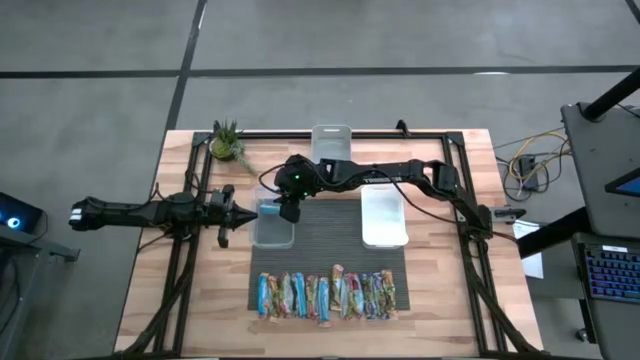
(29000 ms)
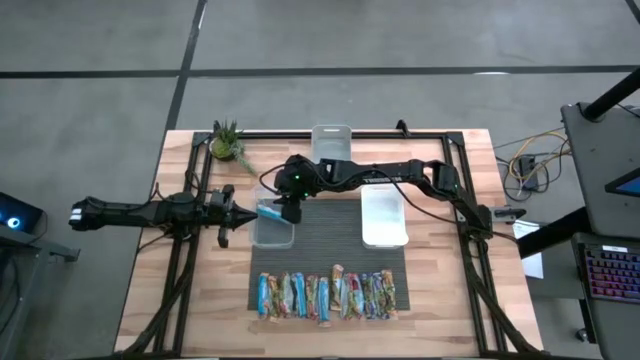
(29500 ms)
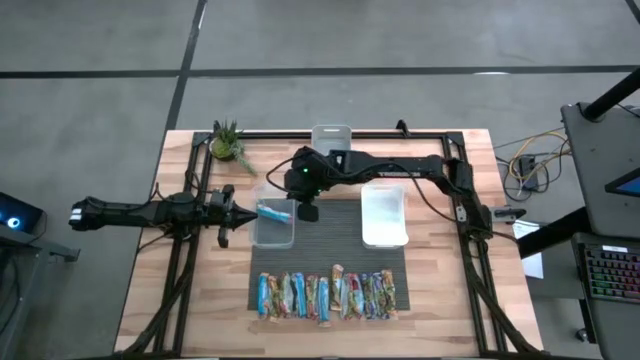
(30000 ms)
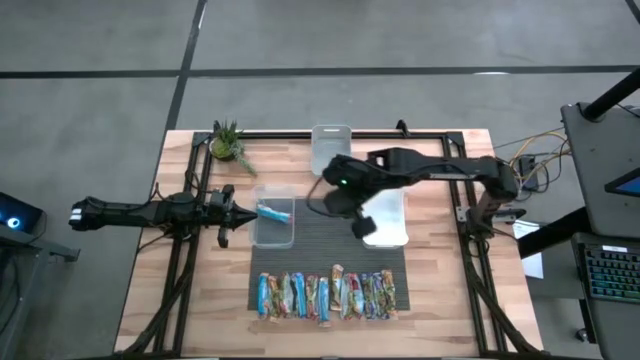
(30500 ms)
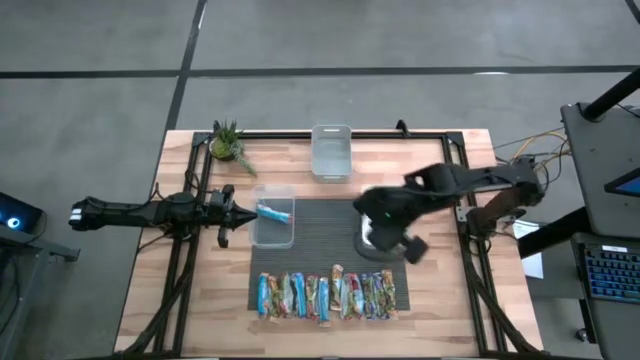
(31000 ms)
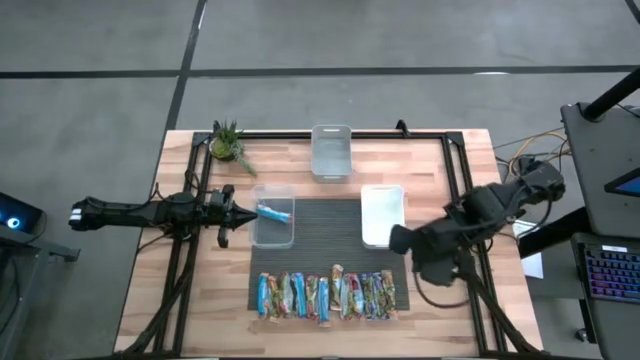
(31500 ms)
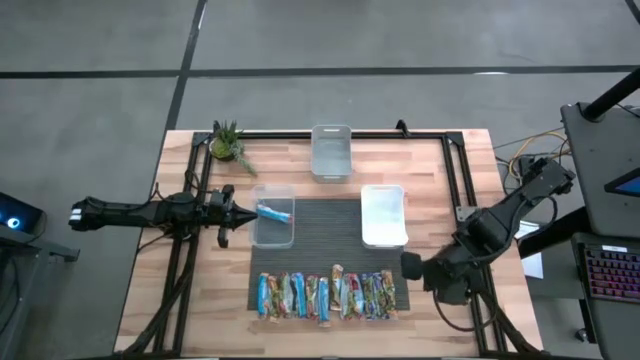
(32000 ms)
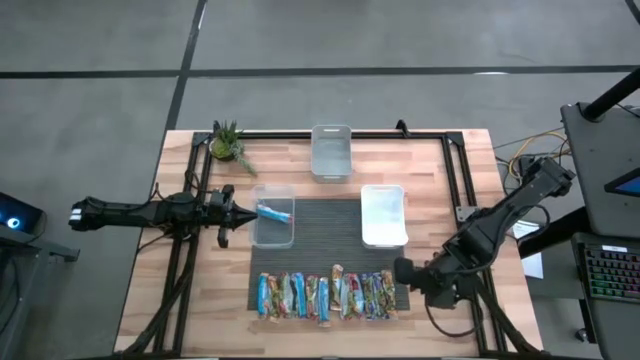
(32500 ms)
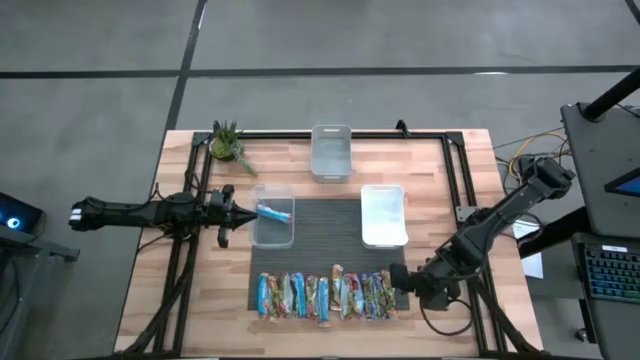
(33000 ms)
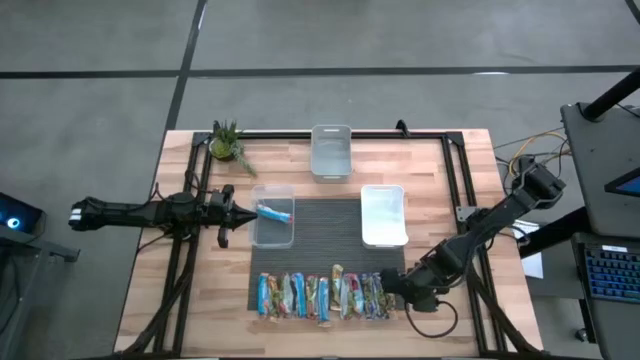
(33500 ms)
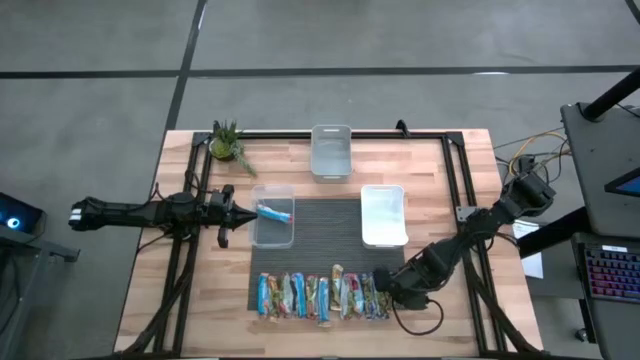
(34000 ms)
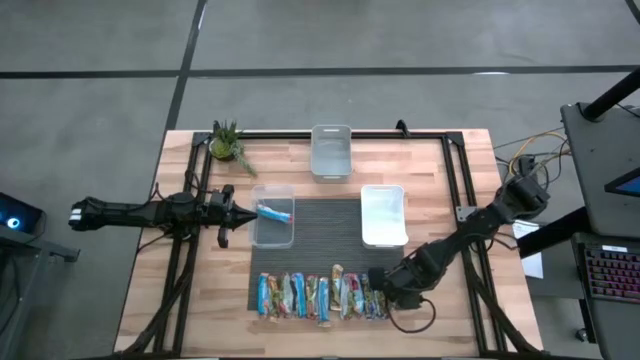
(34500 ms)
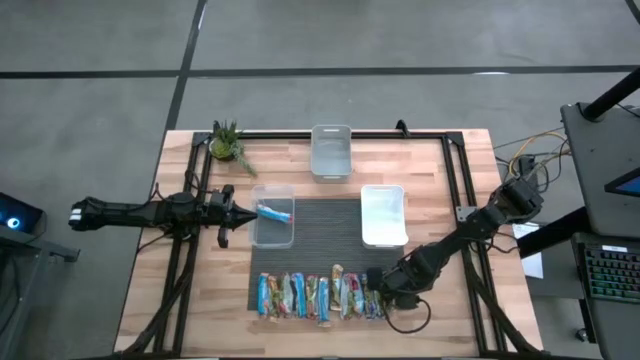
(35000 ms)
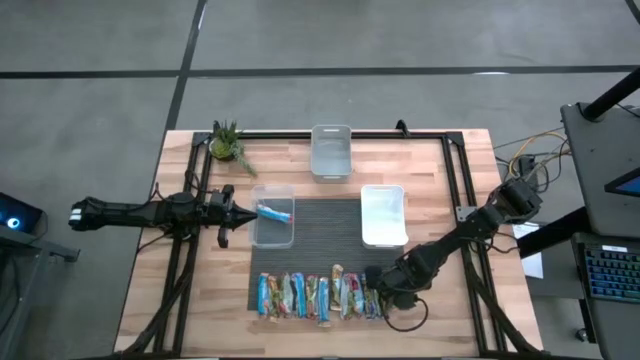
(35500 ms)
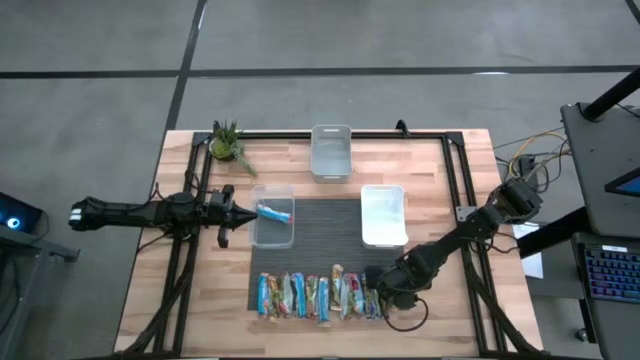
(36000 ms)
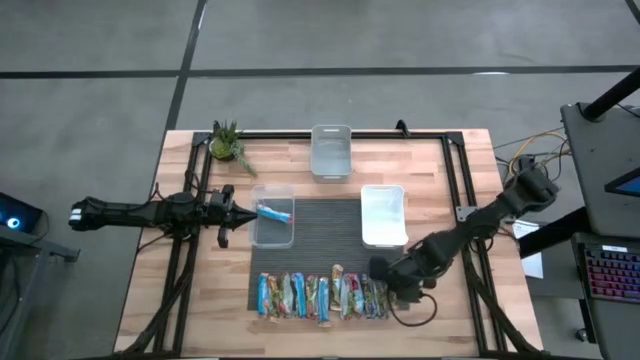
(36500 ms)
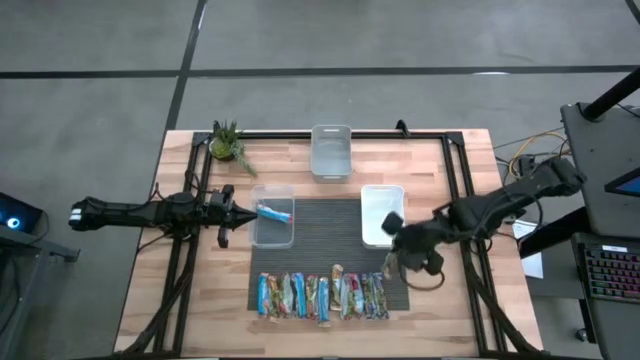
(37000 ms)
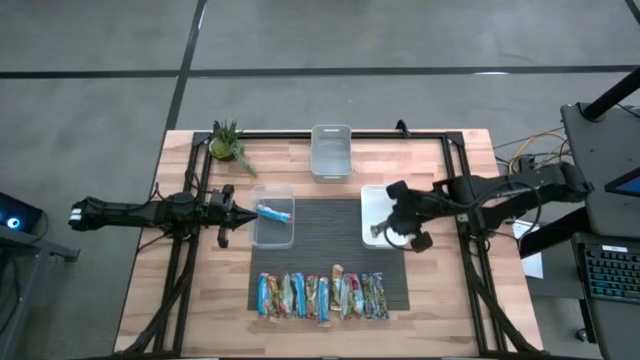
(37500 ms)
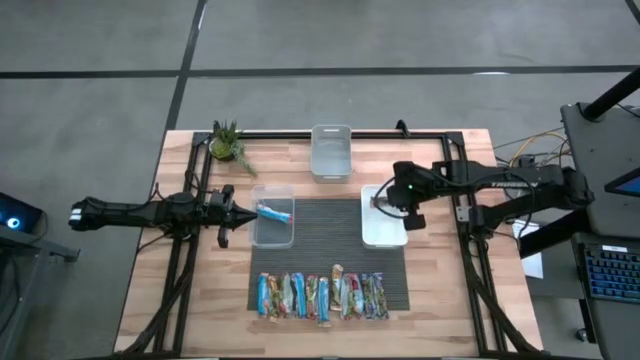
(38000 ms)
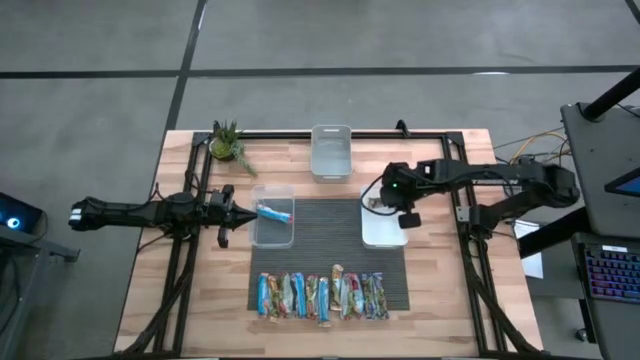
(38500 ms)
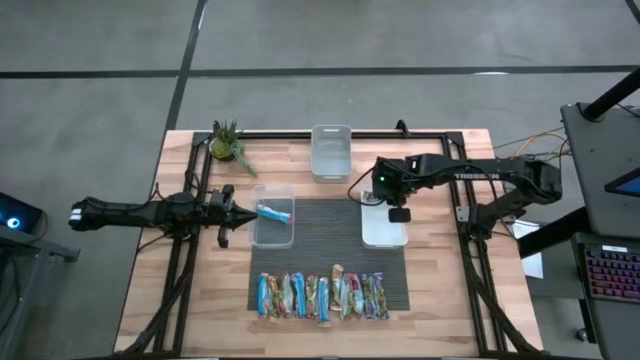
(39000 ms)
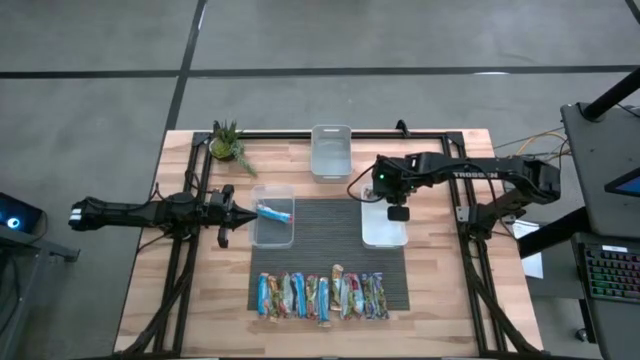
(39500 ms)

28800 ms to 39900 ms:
Task: Pick and place Granola Bars by type
Put the yellow granola bar into the white bin

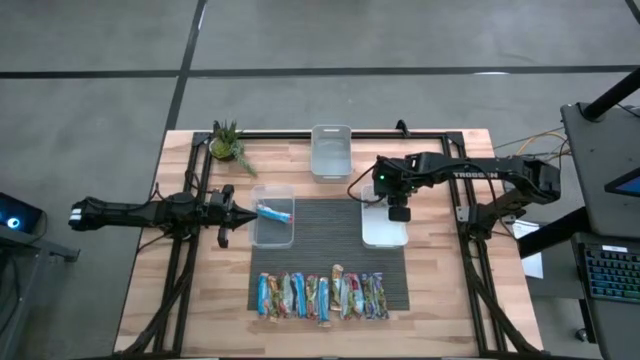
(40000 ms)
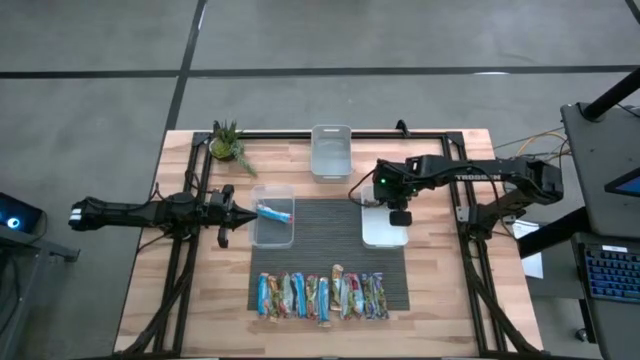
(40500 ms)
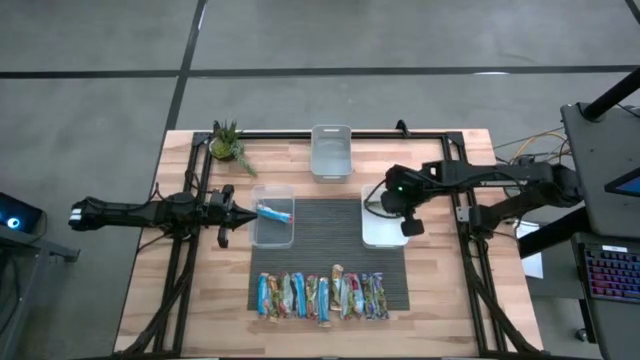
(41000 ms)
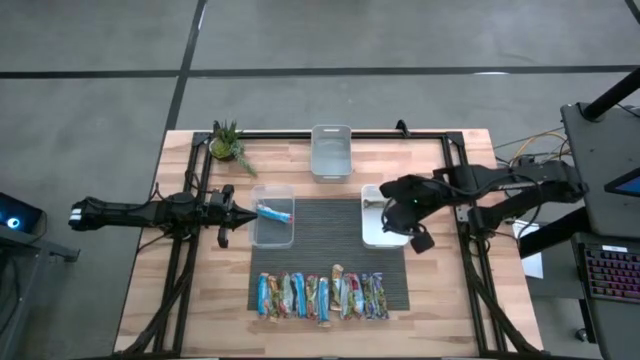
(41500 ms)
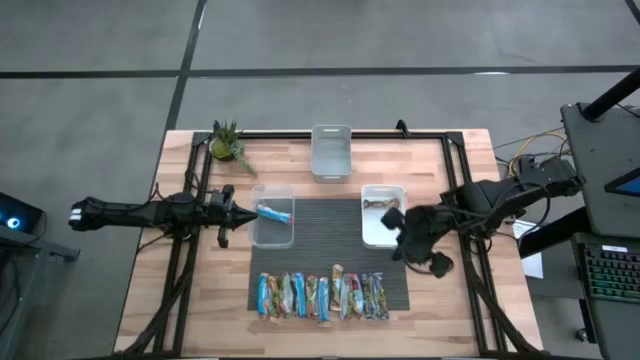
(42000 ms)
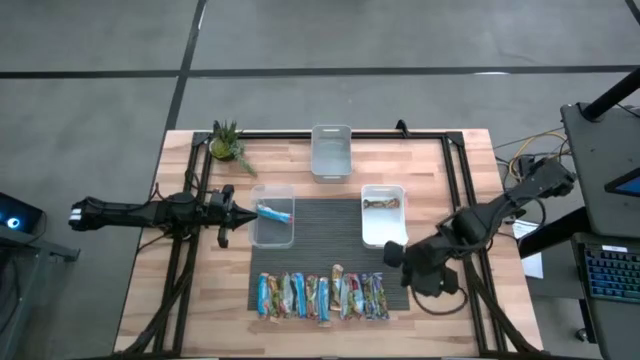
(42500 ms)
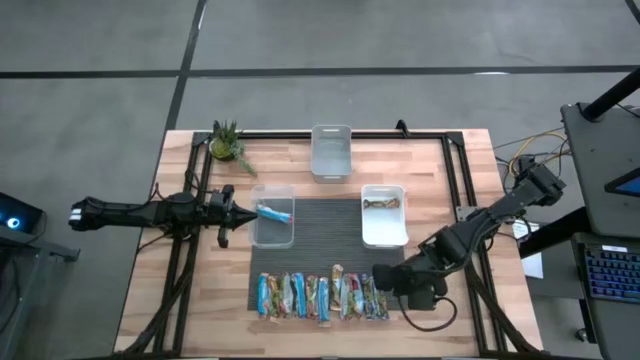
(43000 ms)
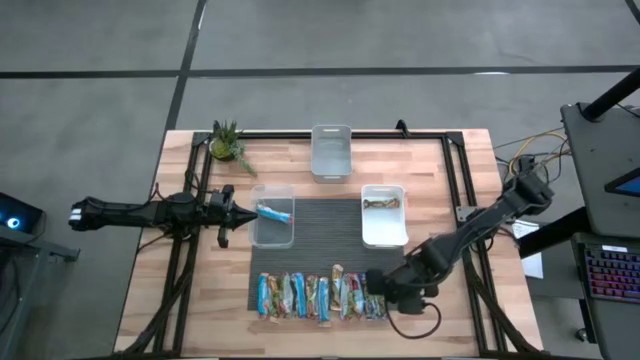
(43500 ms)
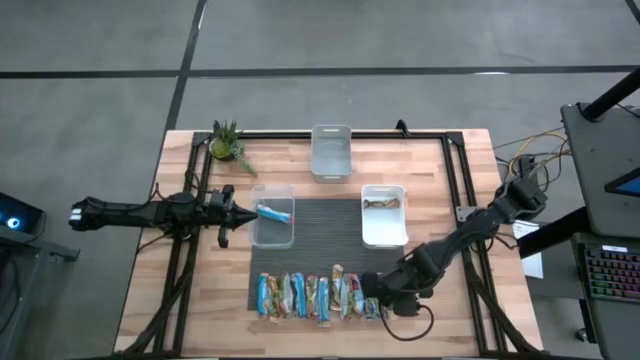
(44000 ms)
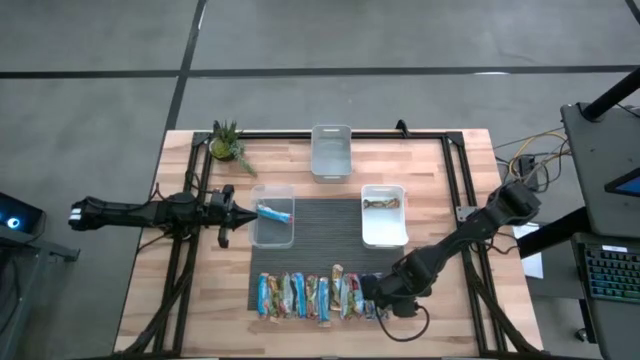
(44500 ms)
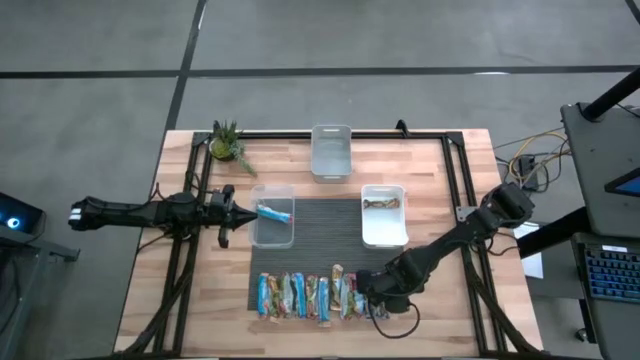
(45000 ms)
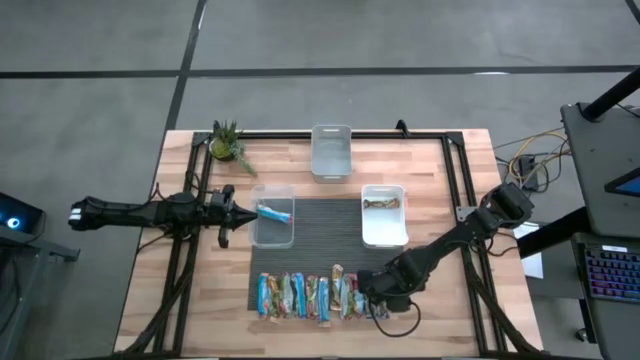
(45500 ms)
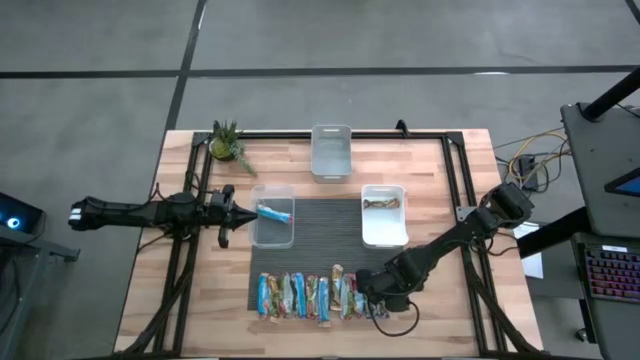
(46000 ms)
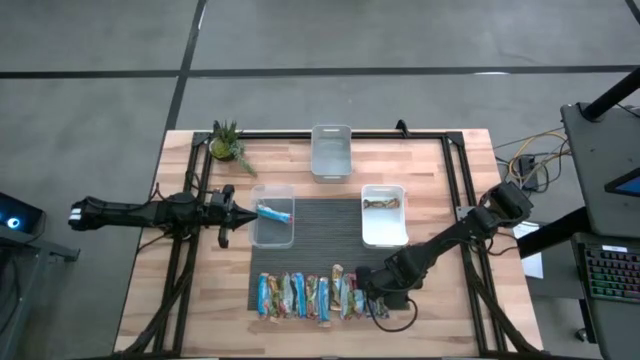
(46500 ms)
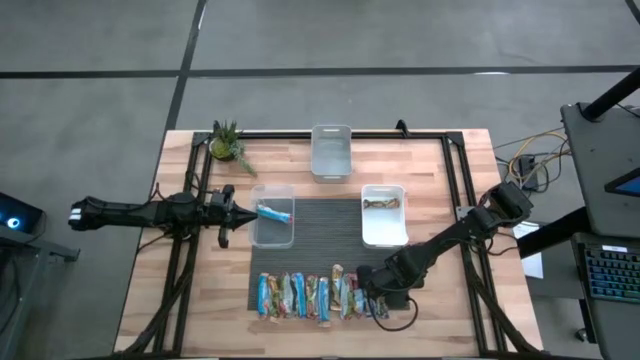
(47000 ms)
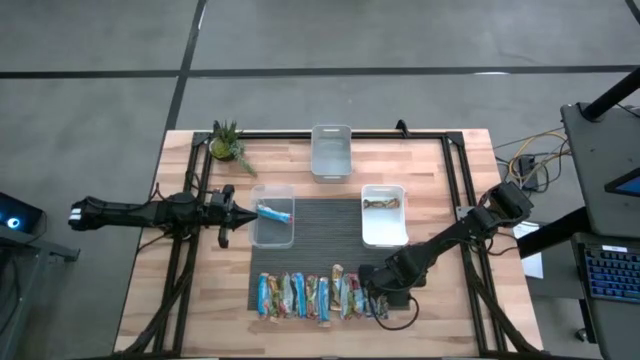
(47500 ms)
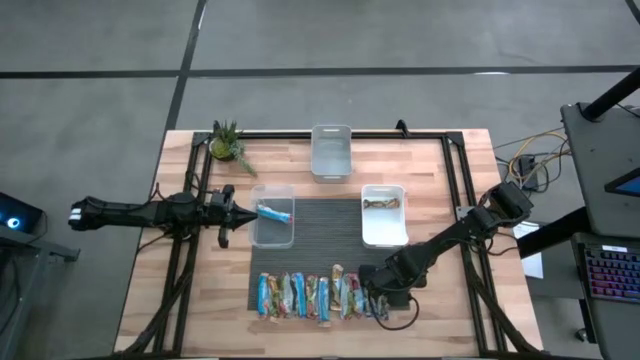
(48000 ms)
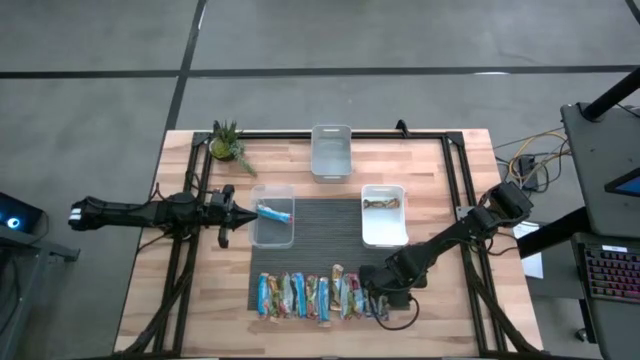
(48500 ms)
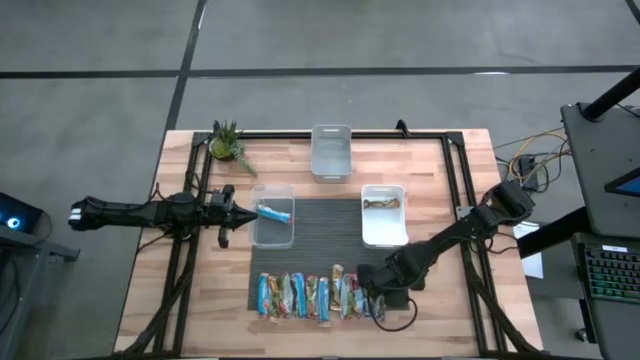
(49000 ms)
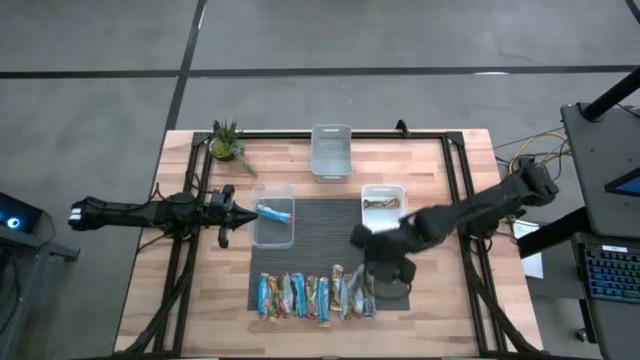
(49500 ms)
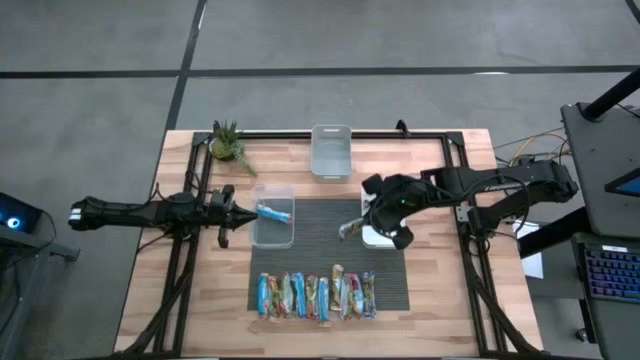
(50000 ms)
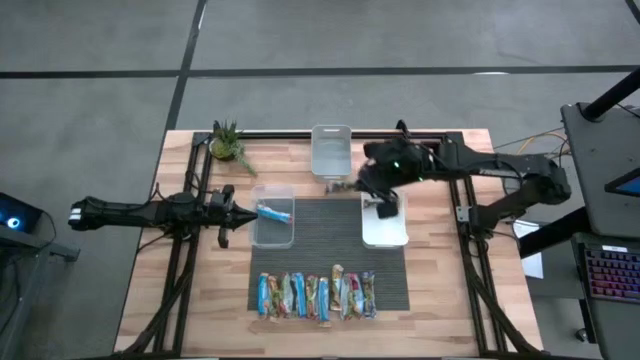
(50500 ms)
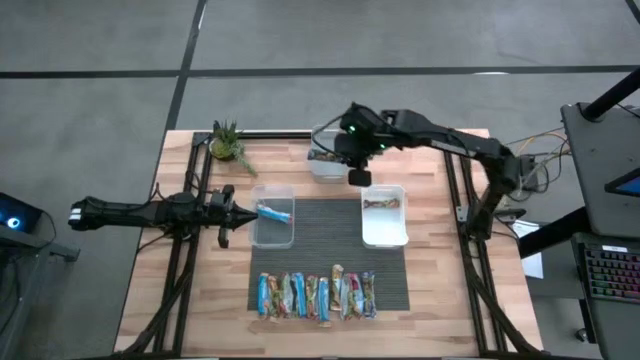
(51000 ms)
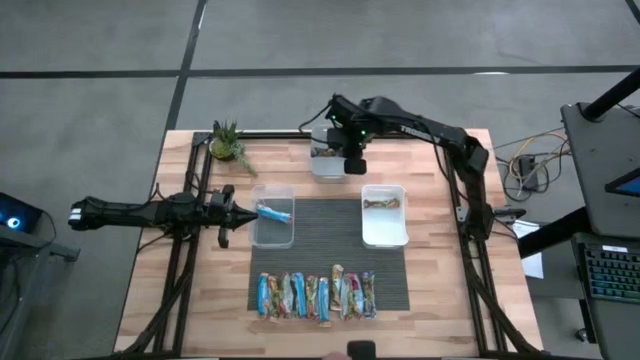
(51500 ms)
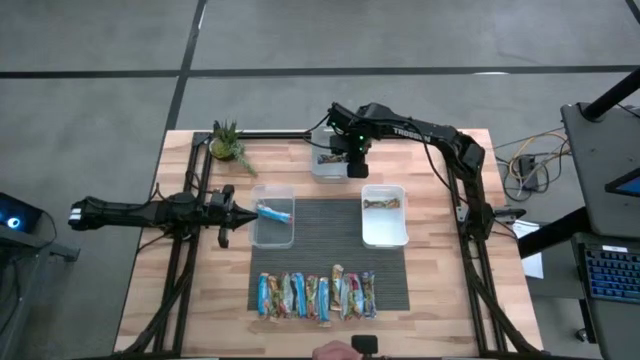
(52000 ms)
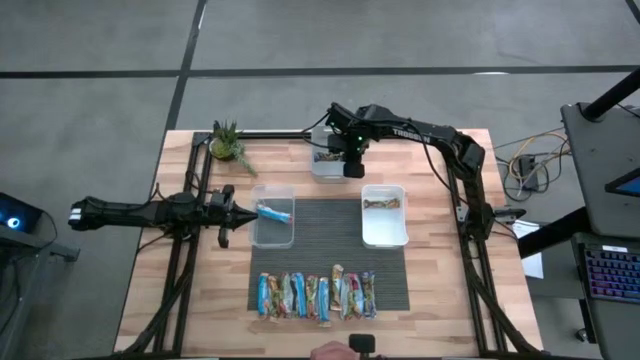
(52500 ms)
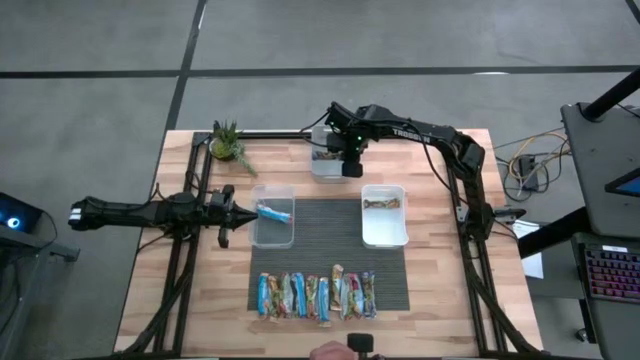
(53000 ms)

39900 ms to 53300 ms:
Put the blue granola bar into the gray bin
